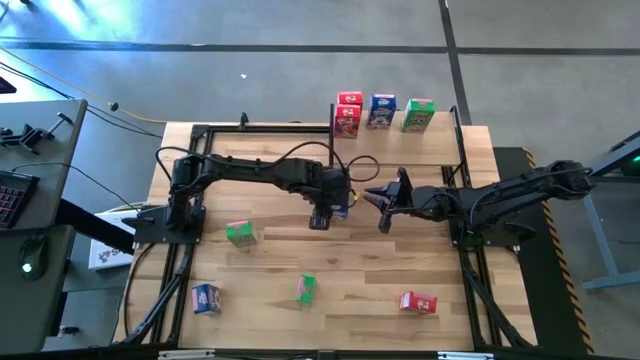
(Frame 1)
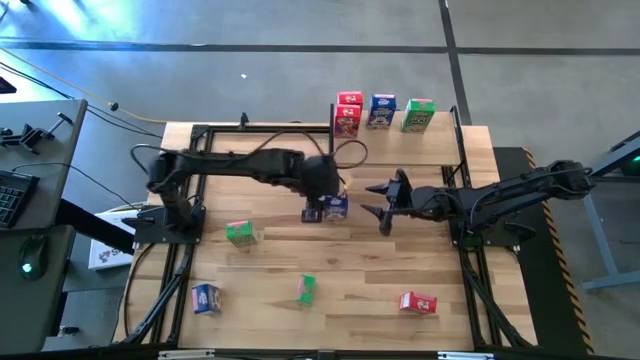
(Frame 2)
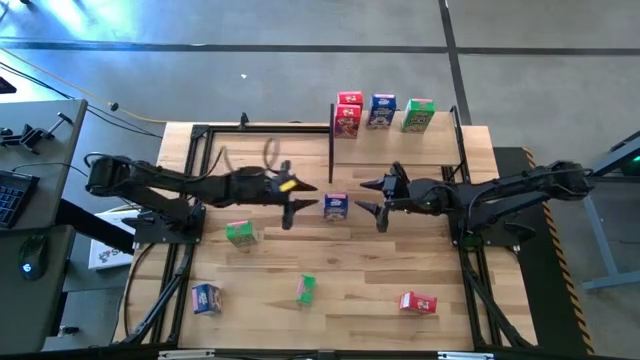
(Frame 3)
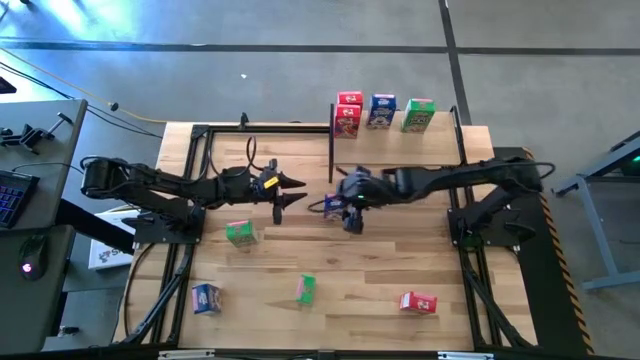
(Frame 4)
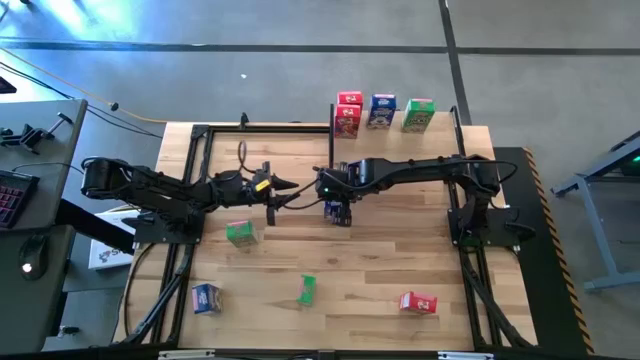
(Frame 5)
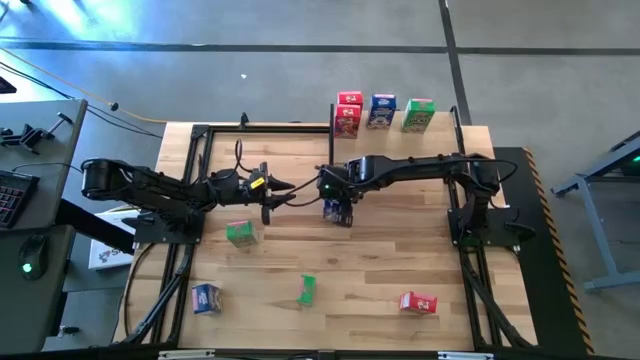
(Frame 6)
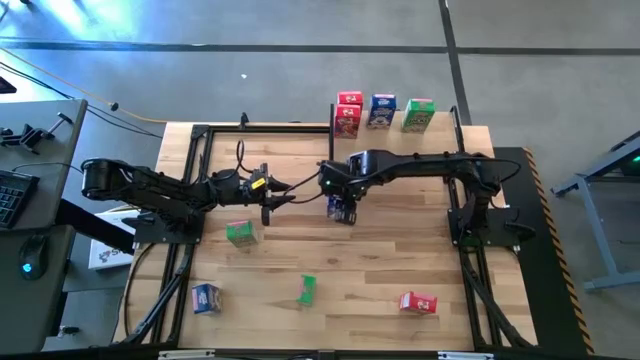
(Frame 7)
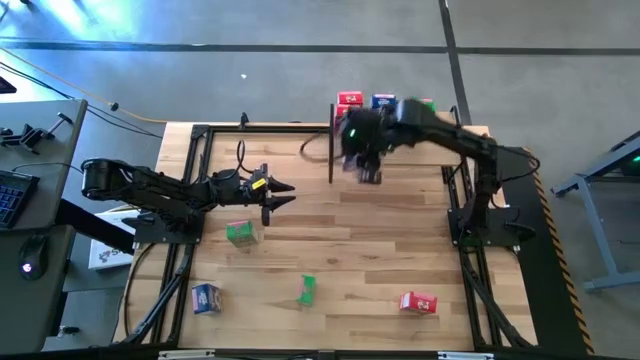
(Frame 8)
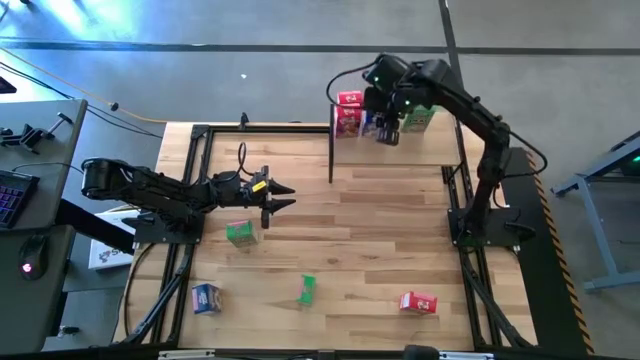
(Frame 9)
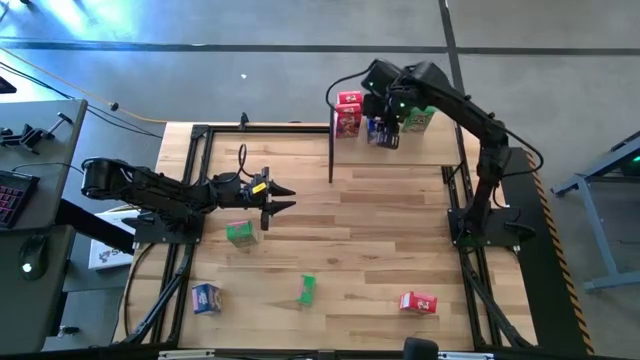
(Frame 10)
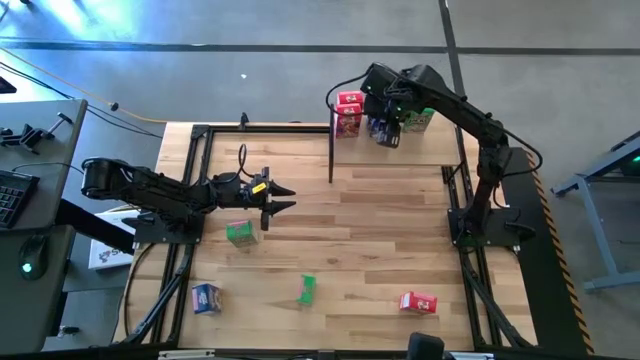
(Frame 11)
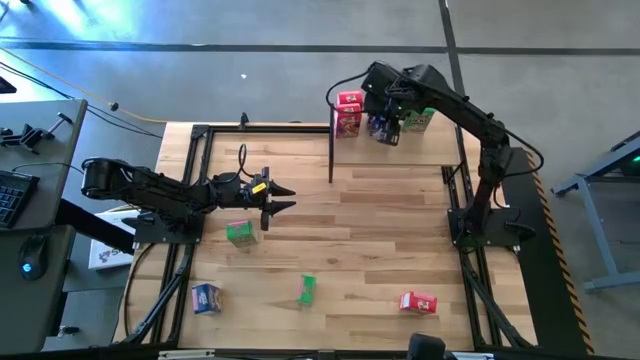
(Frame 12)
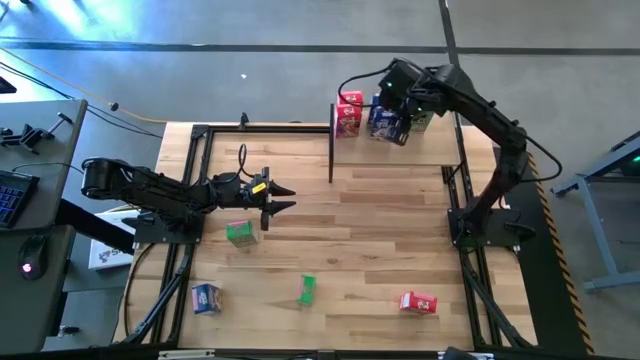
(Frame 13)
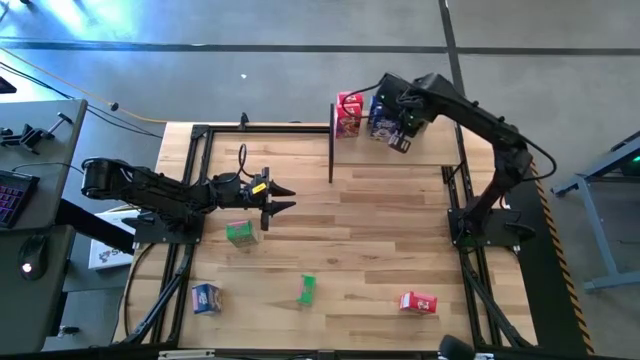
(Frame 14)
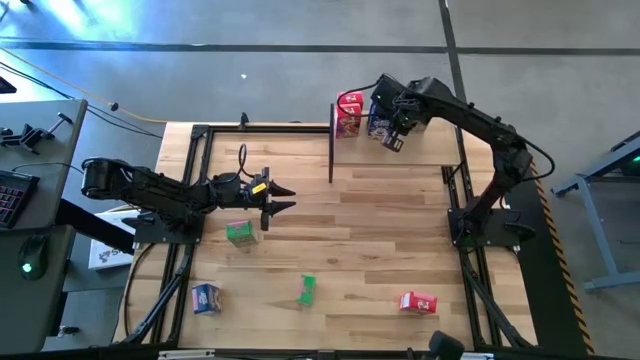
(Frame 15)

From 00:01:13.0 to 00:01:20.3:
Task: Stack cereal on shelf
Put the blue cereal box on the table next to the other blue cereal box

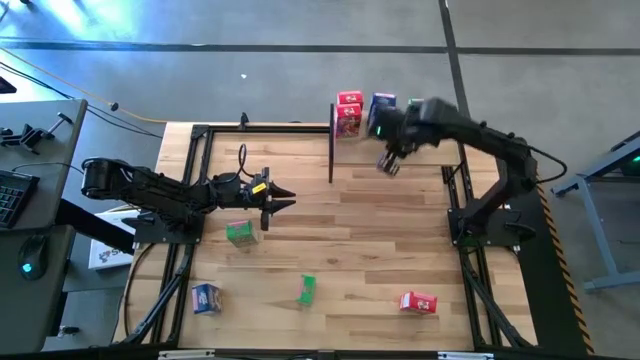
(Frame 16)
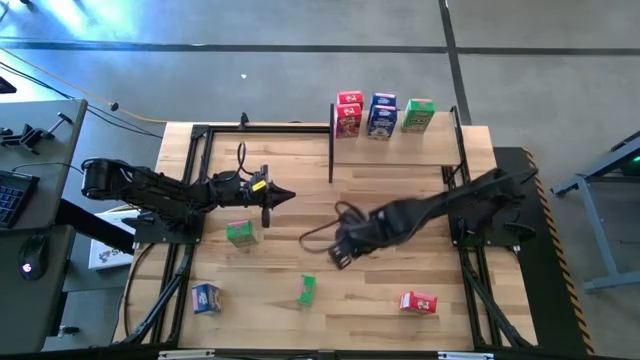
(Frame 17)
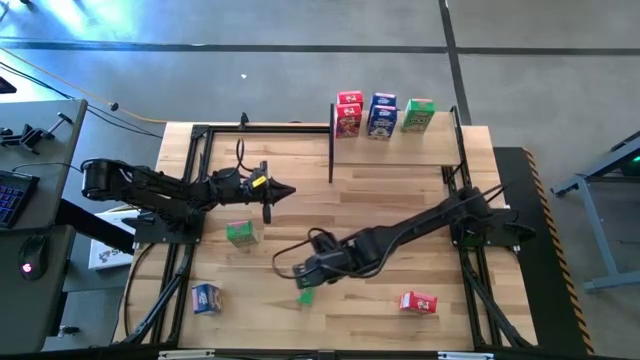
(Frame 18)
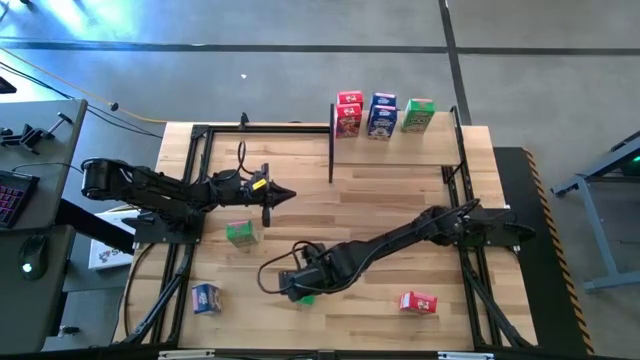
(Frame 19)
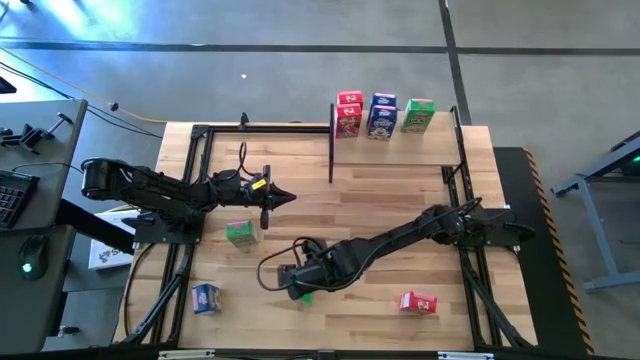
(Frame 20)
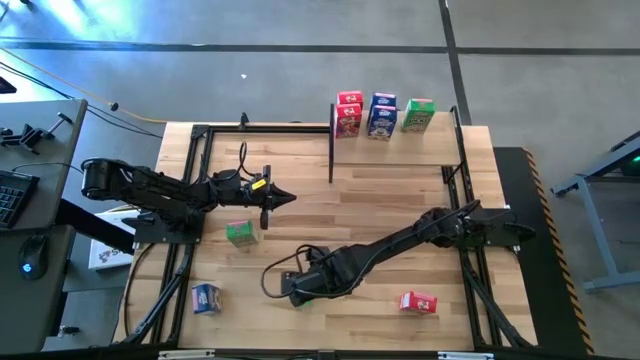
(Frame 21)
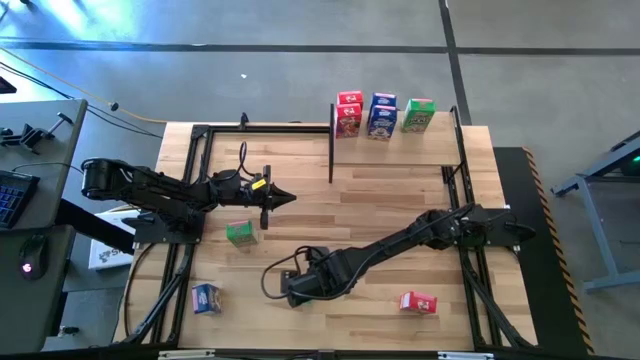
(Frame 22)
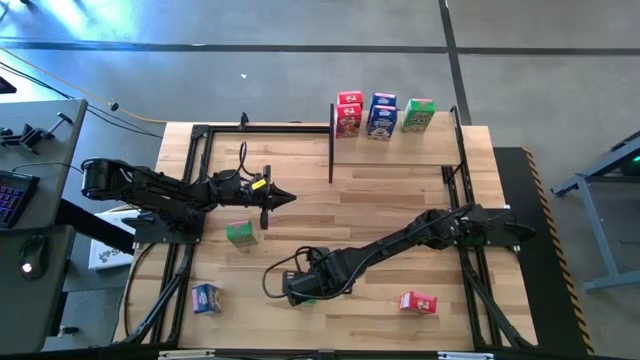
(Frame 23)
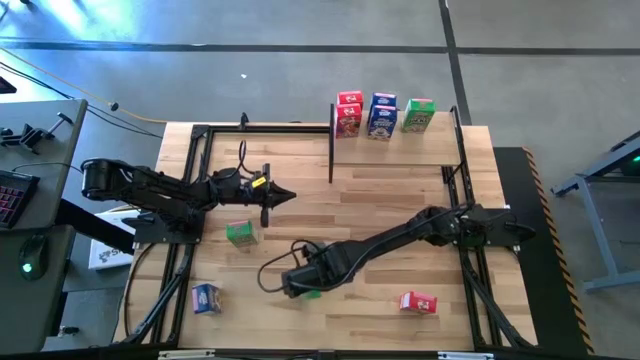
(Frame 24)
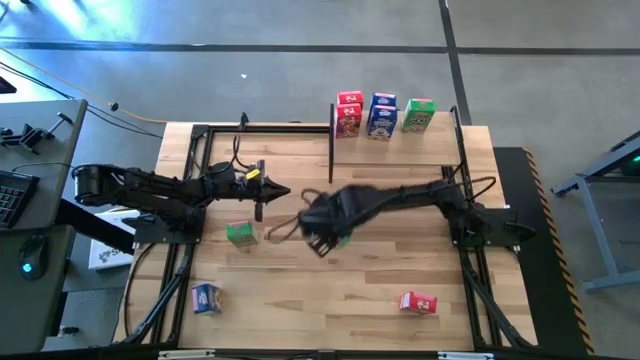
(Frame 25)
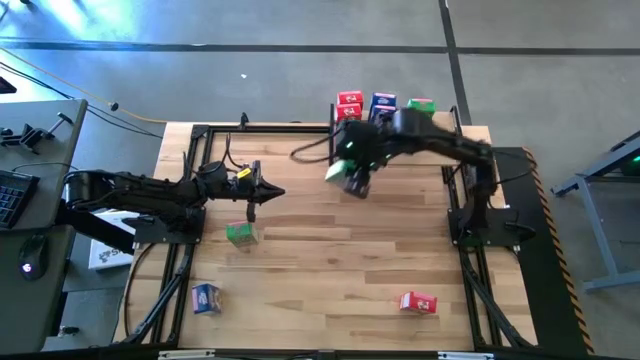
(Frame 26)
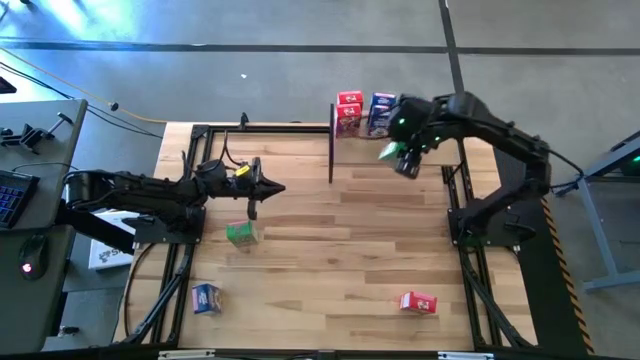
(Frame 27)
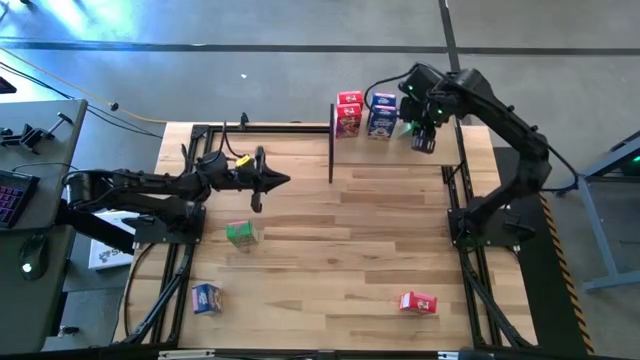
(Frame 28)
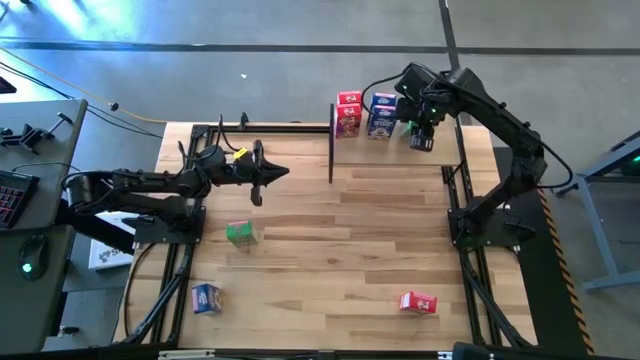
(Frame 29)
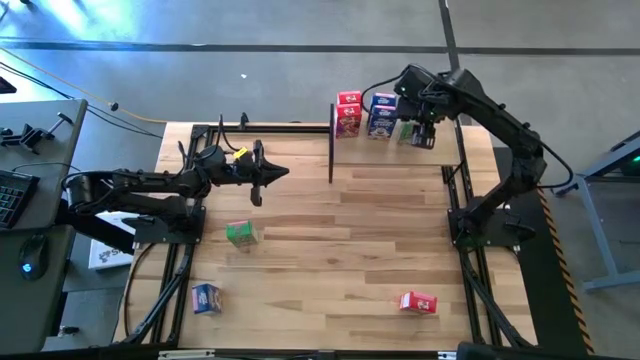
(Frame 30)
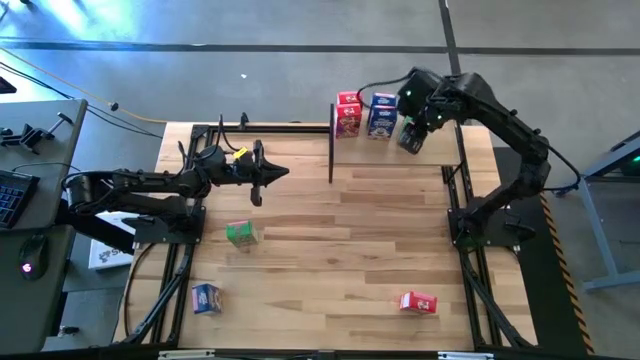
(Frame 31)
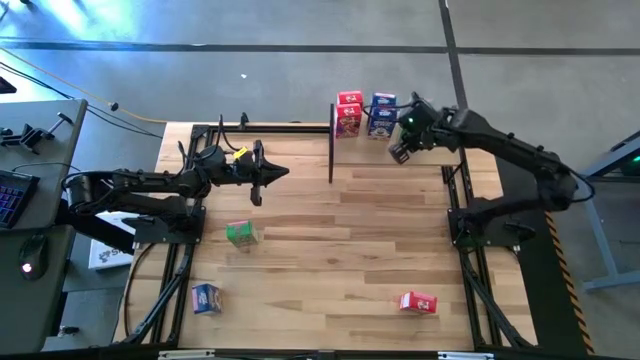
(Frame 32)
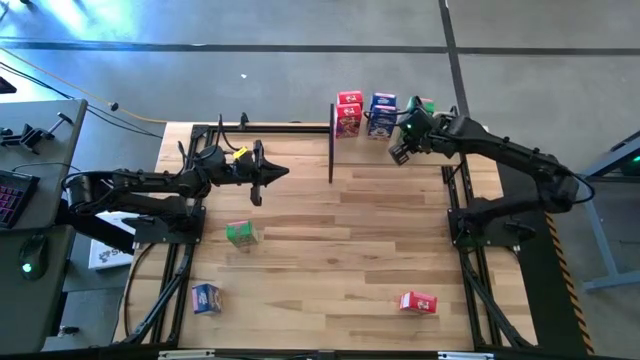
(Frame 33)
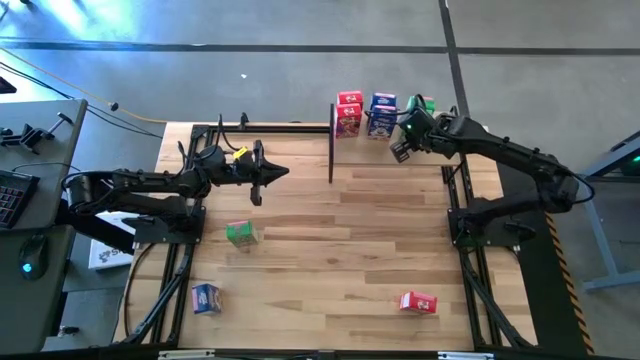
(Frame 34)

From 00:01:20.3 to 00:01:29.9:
Put the bottom green cereal box on the shelf and aligned with the other green cereal box

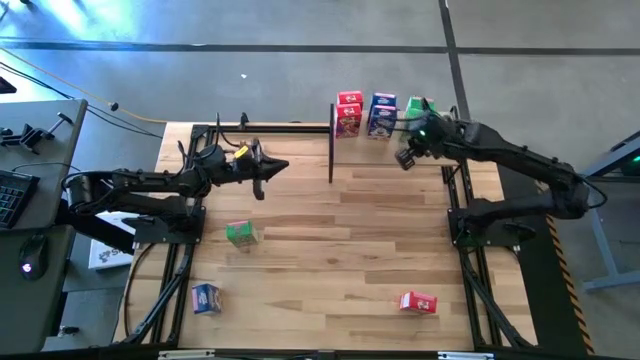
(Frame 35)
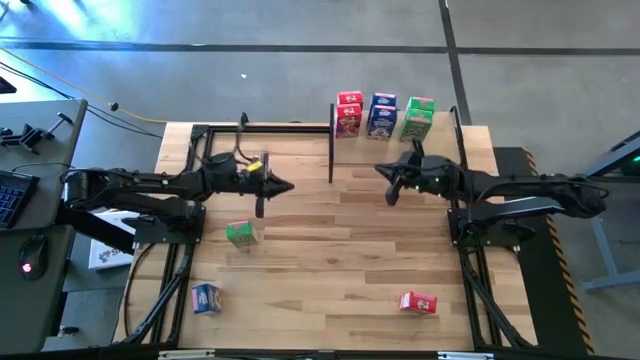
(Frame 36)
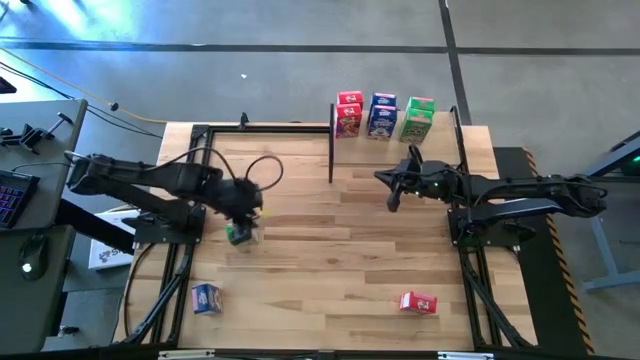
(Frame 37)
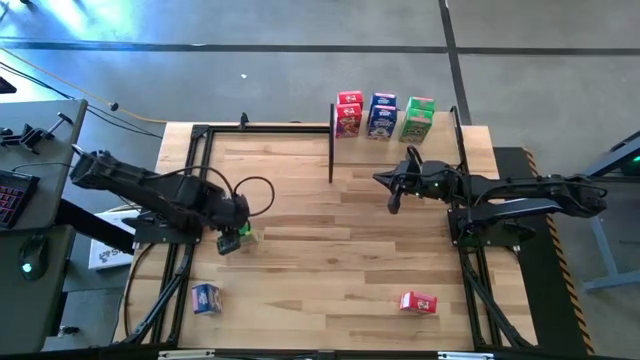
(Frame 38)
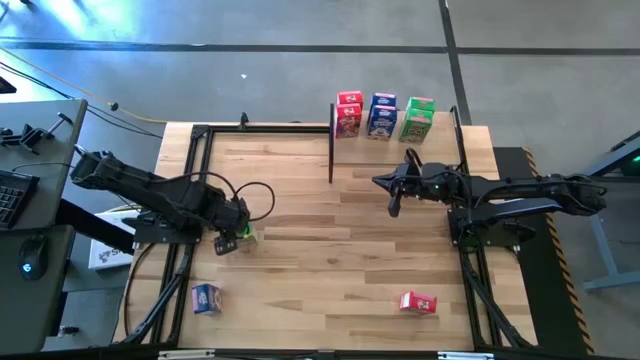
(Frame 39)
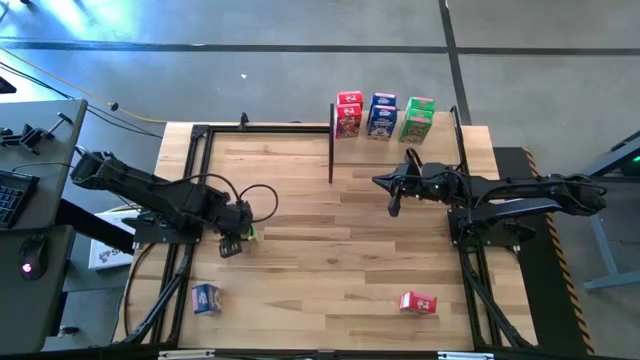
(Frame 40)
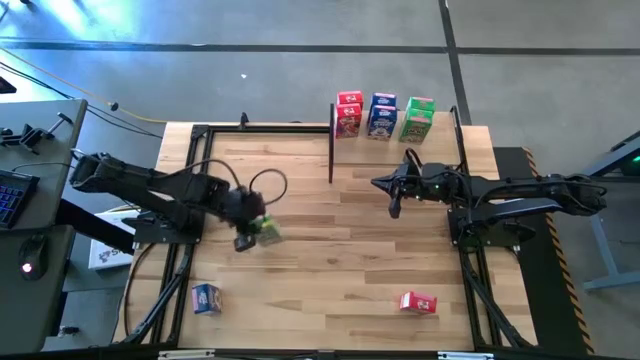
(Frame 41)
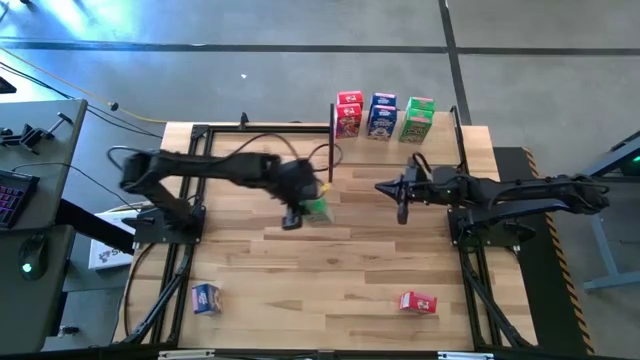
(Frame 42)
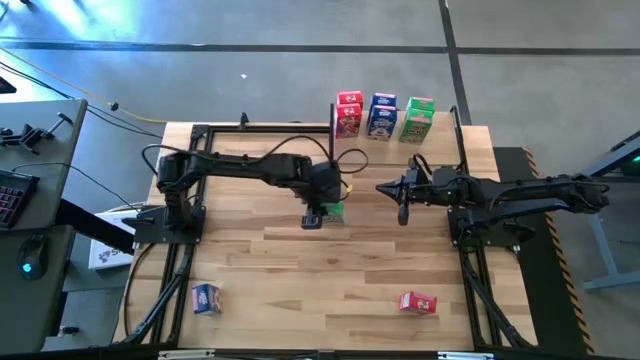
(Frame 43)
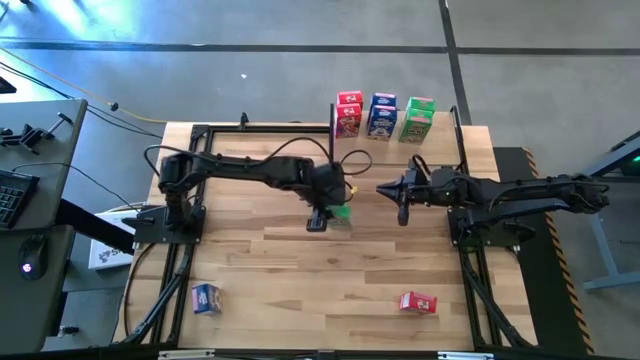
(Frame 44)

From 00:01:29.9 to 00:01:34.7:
Move the green cereal box to the center of the table
